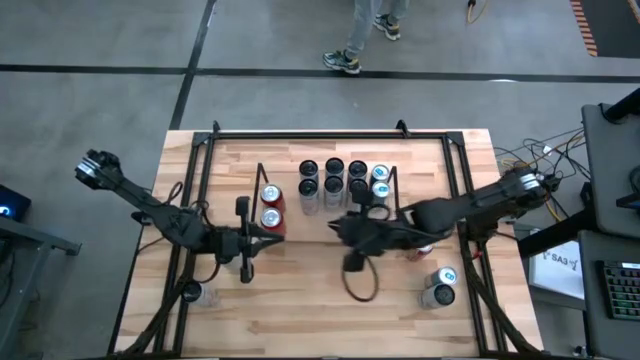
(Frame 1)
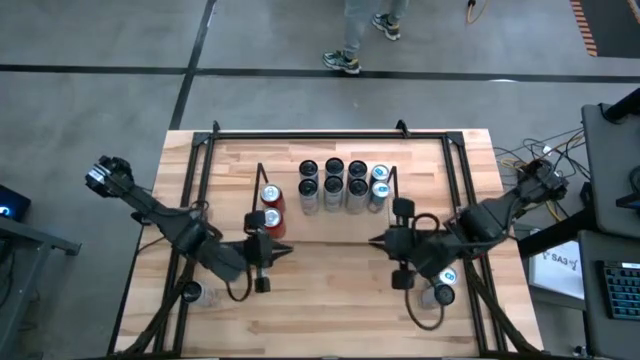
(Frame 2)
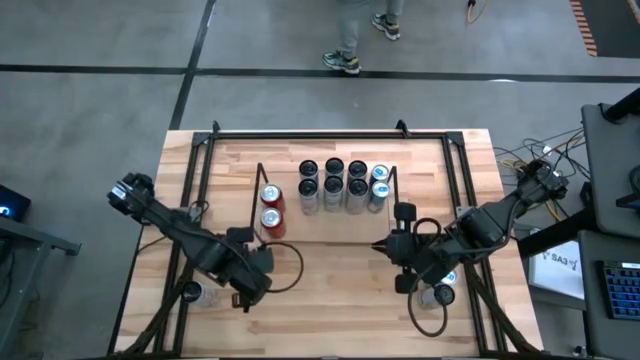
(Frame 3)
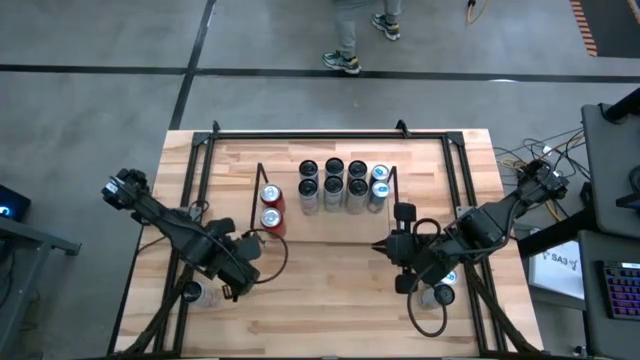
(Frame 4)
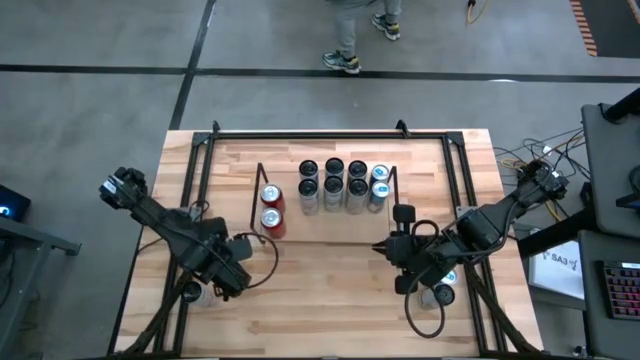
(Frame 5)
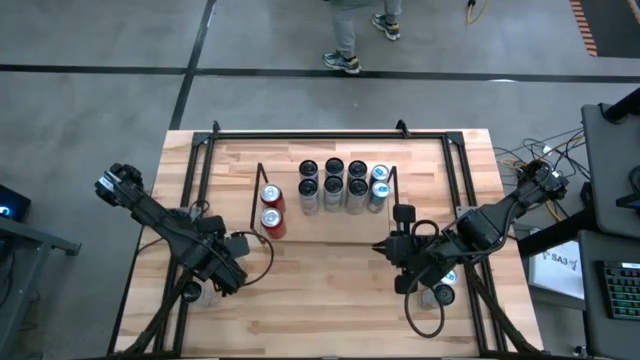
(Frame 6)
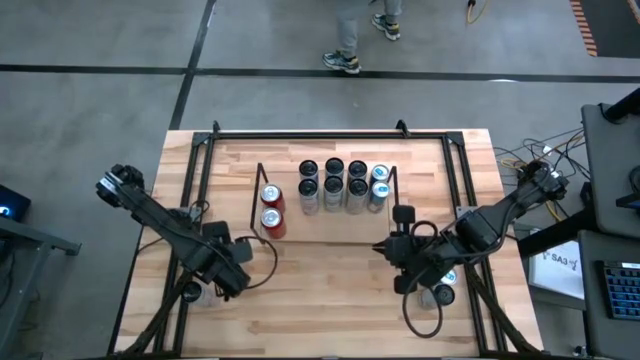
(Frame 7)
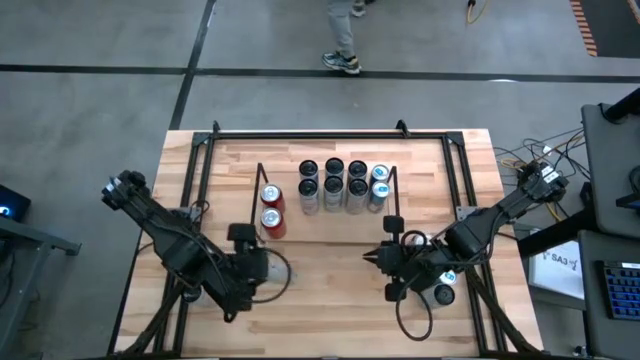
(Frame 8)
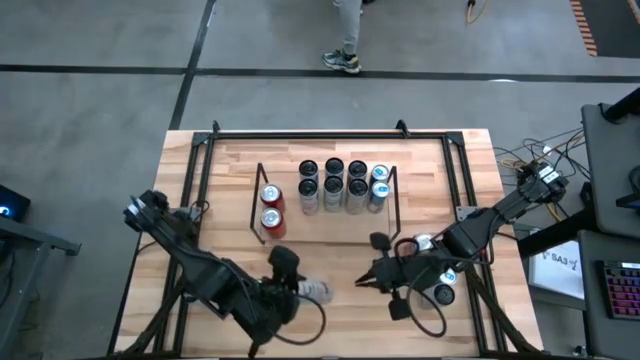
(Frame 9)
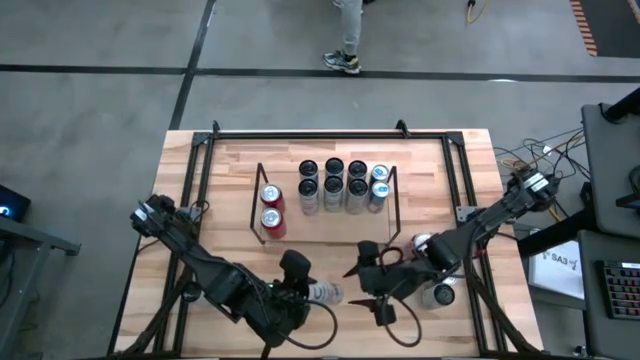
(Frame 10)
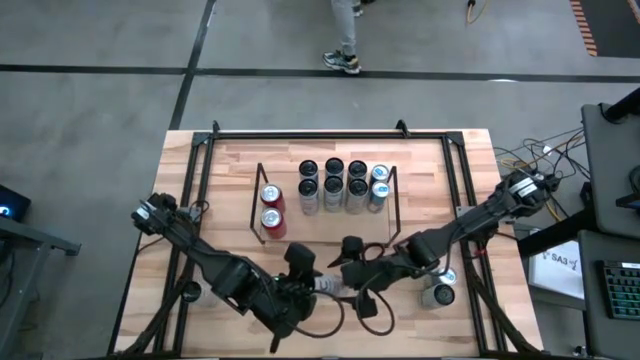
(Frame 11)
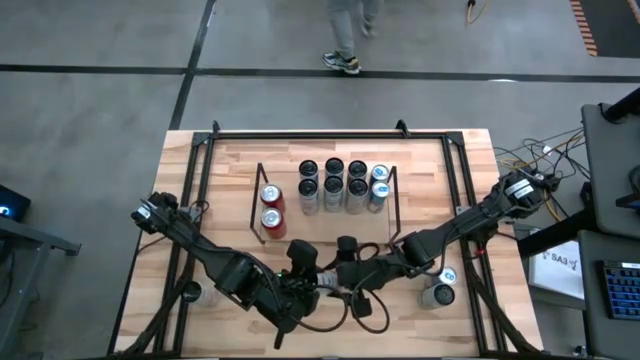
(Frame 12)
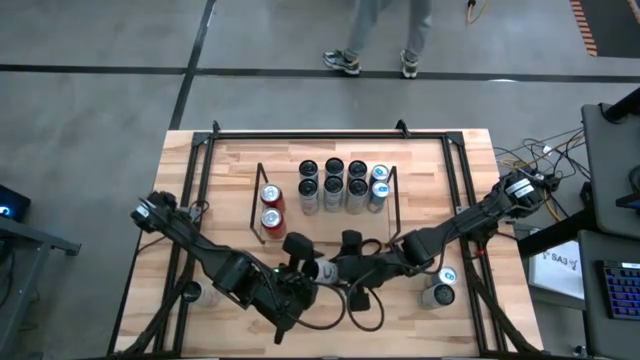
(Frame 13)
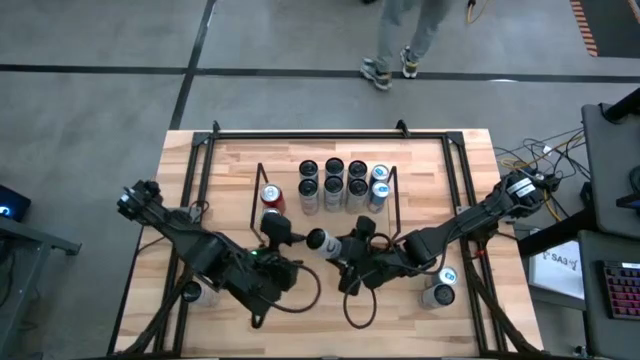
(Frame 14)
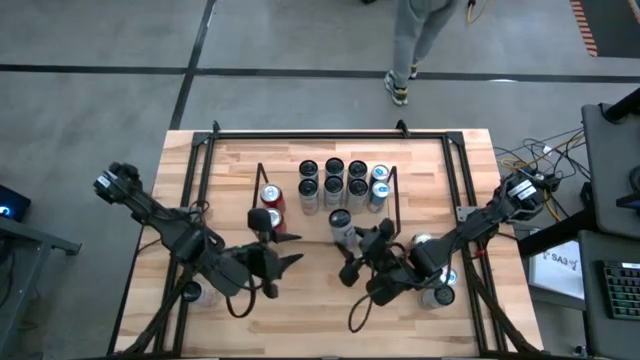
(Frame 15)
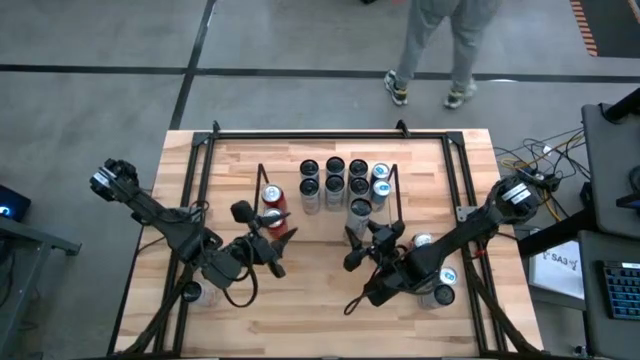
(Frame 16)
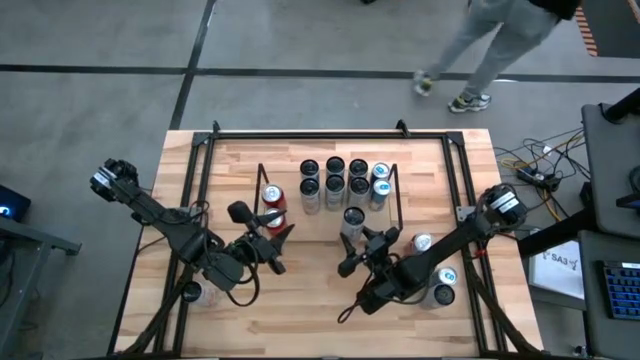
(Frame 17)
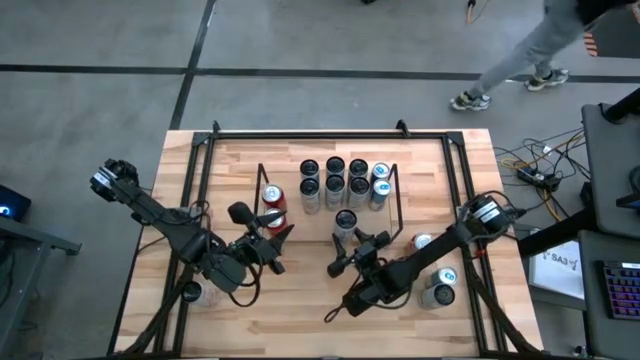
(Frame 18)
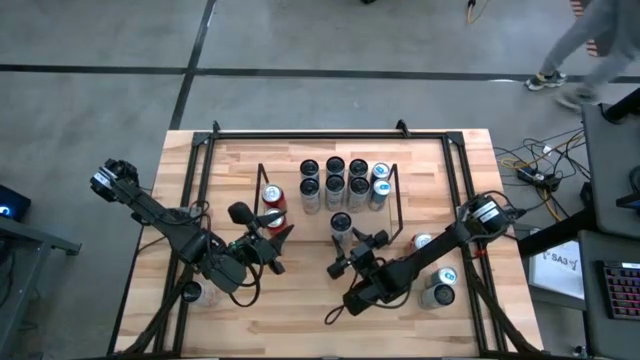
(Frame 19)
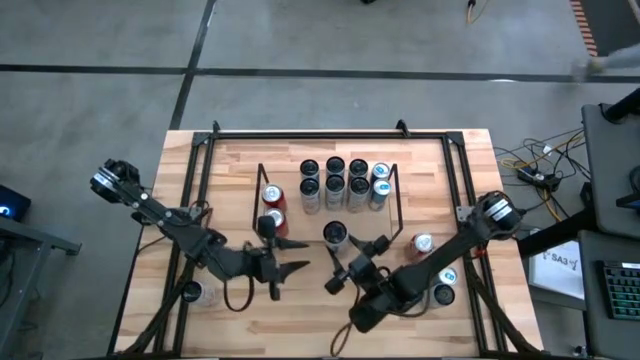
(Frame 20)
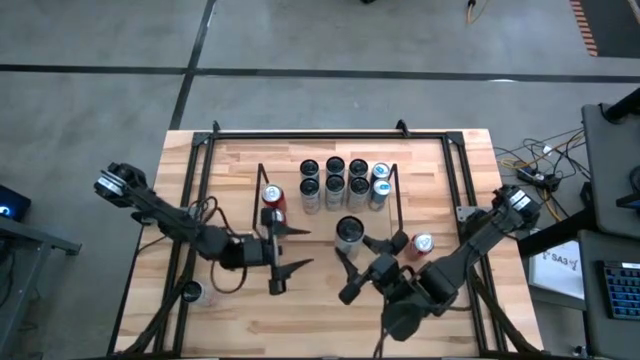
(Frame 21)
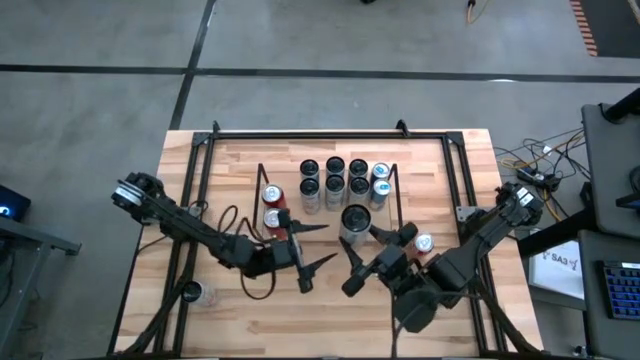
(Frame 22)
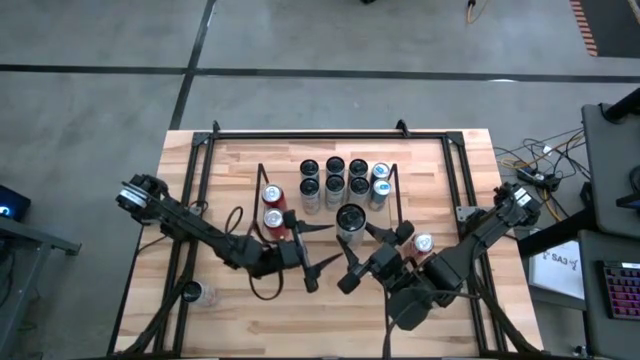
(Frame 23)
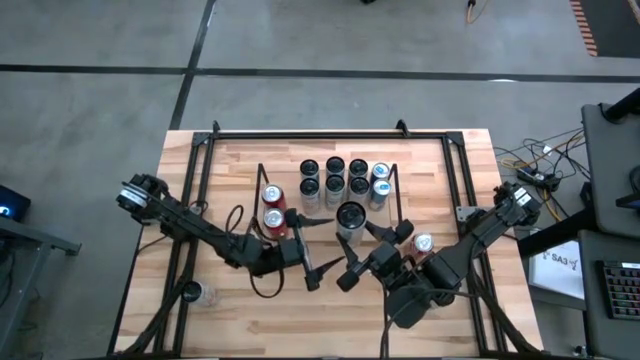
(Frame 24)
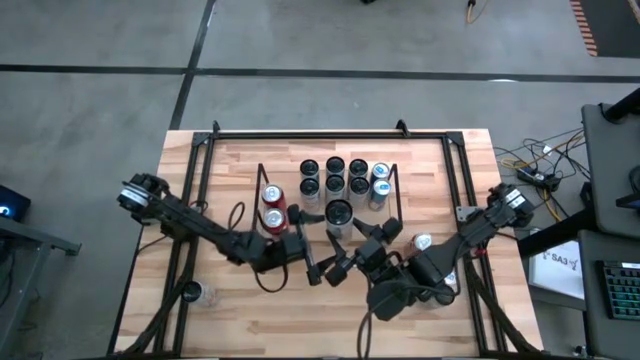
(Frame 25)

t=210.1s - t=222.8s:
Task: Place canned beverage on shelf
Put the white and yellow soda can on the shelf aligned with the other white and yellow soda can

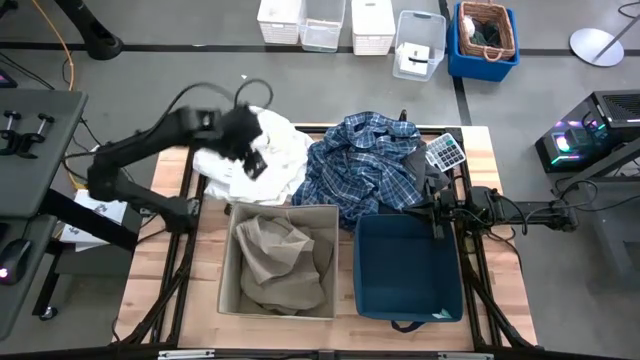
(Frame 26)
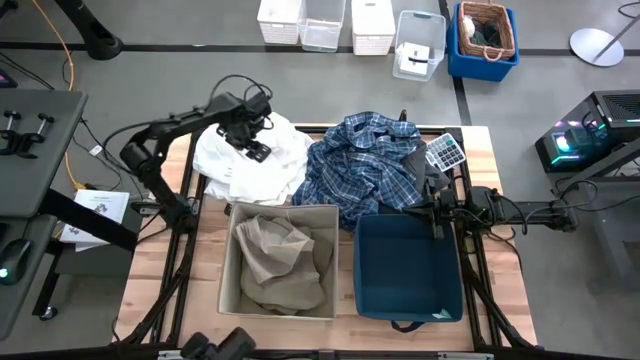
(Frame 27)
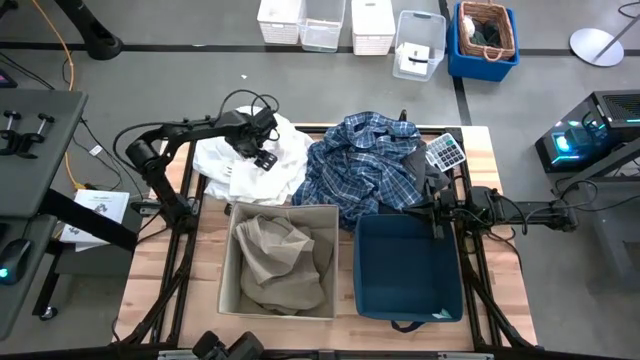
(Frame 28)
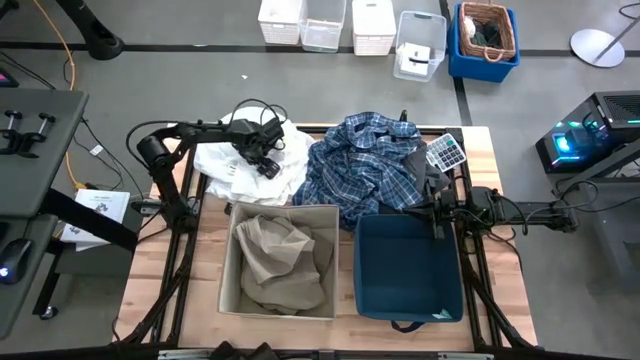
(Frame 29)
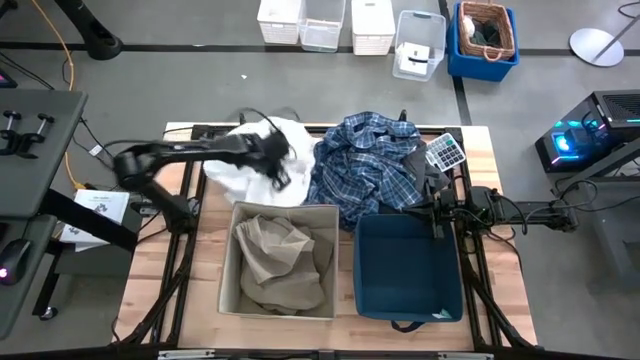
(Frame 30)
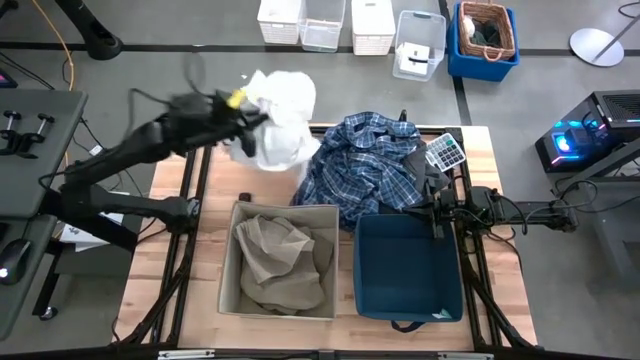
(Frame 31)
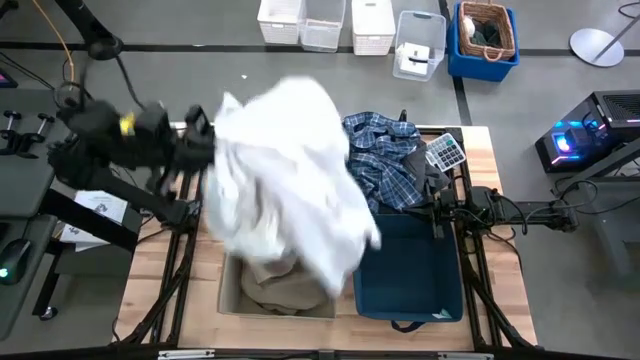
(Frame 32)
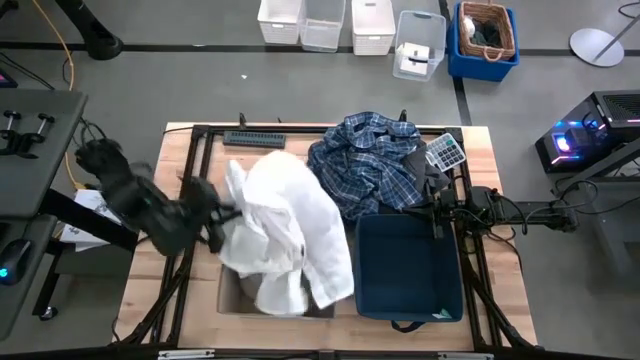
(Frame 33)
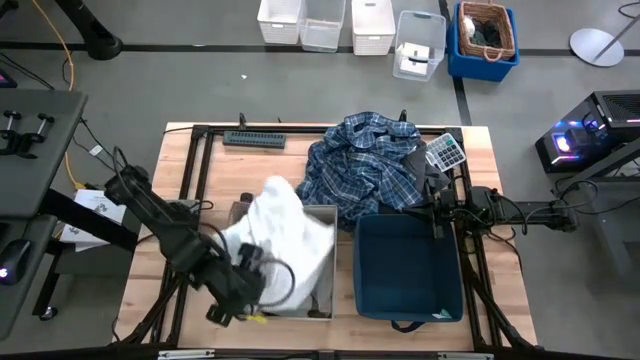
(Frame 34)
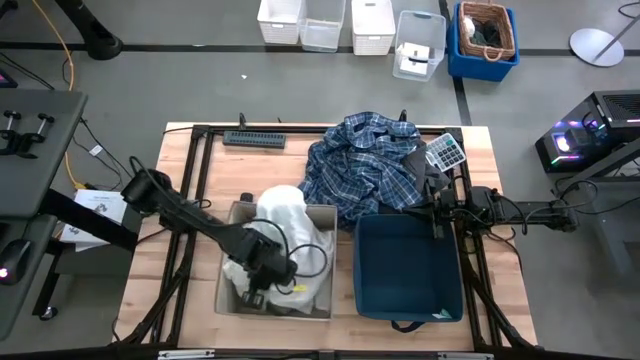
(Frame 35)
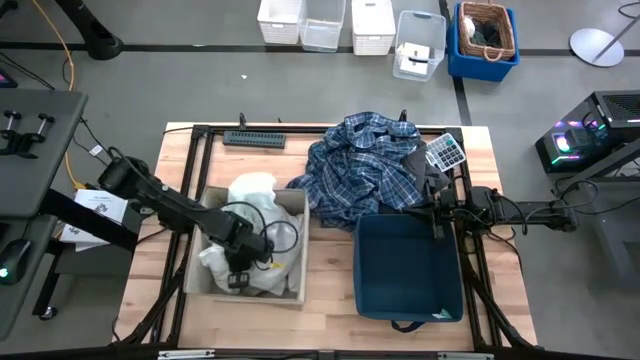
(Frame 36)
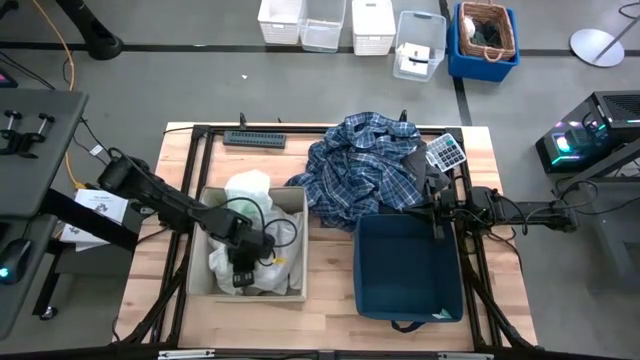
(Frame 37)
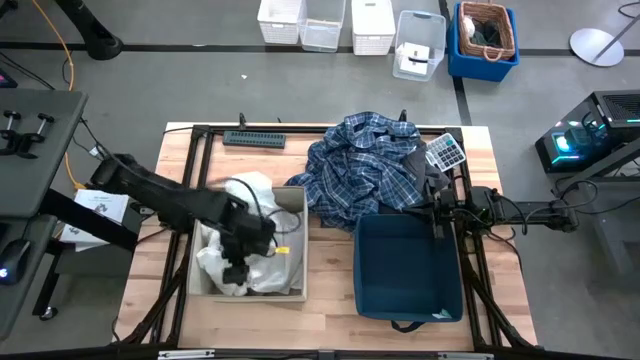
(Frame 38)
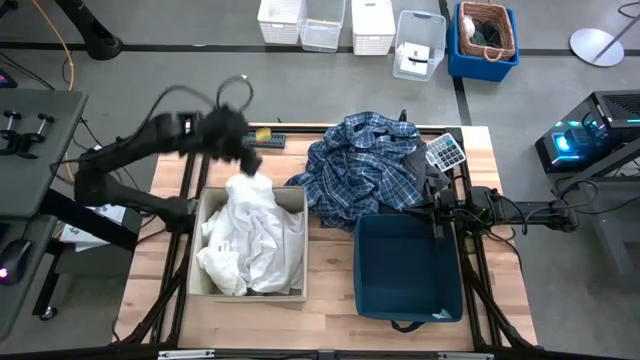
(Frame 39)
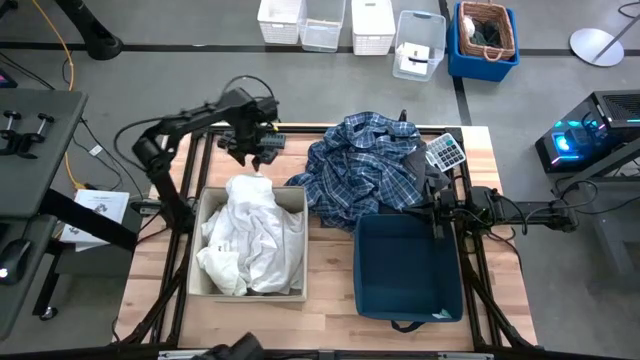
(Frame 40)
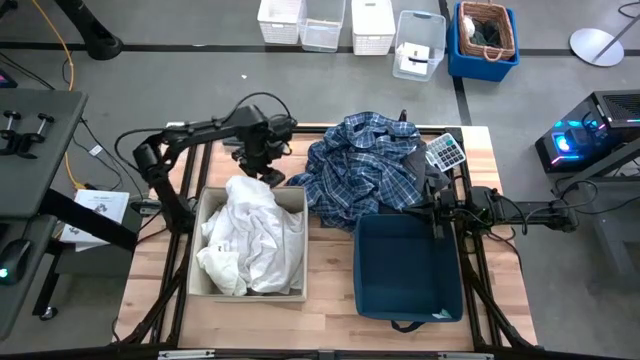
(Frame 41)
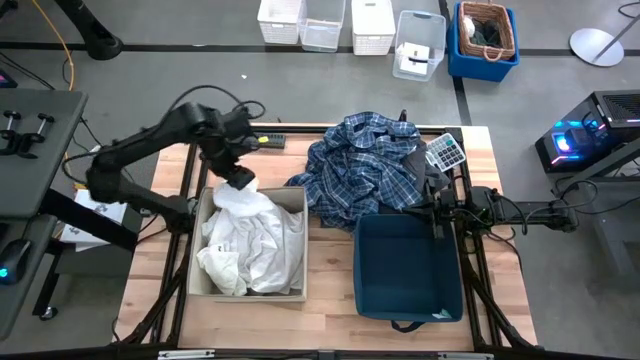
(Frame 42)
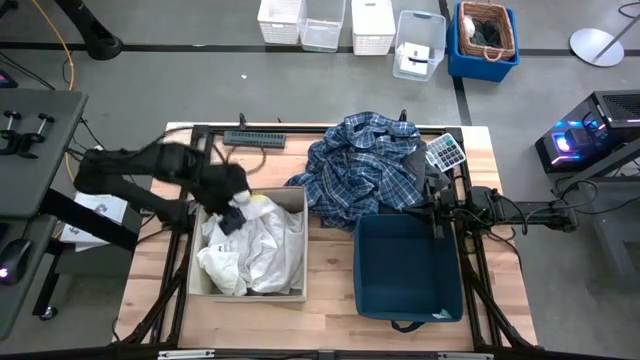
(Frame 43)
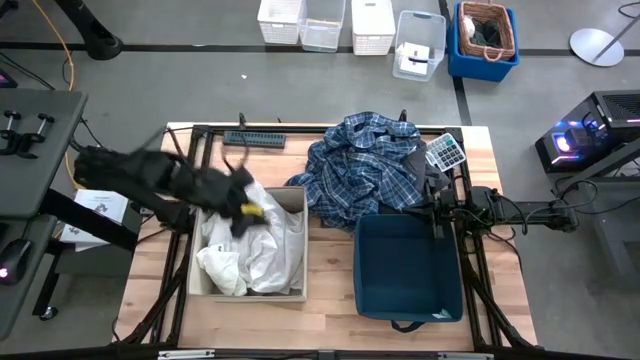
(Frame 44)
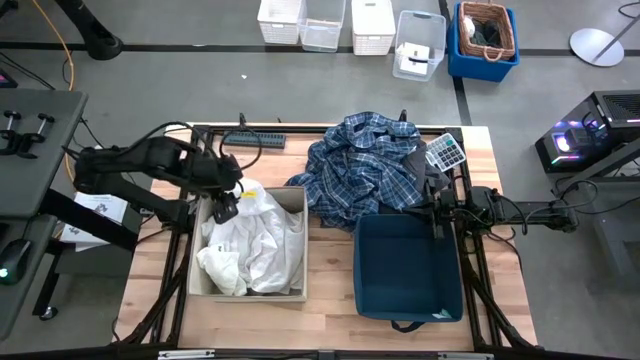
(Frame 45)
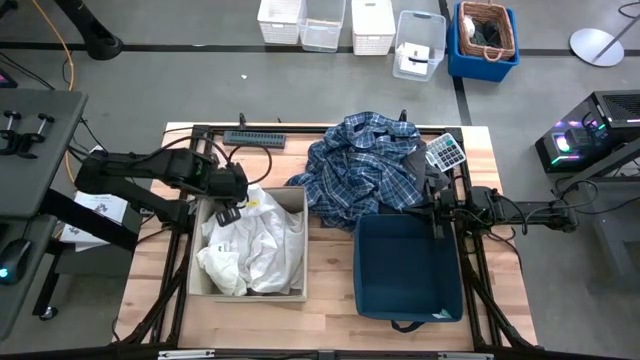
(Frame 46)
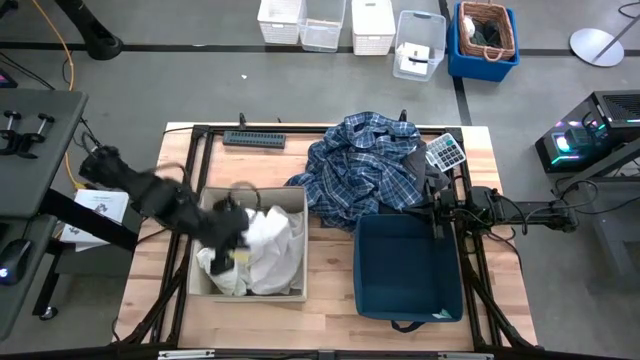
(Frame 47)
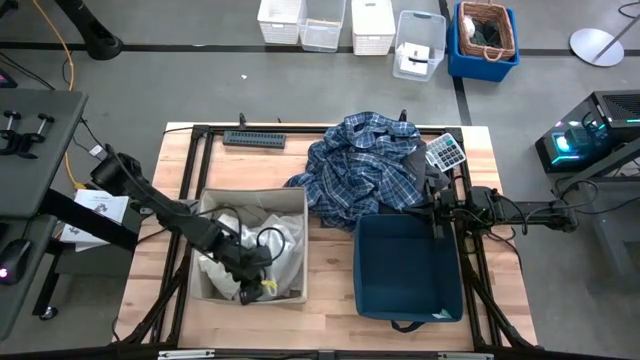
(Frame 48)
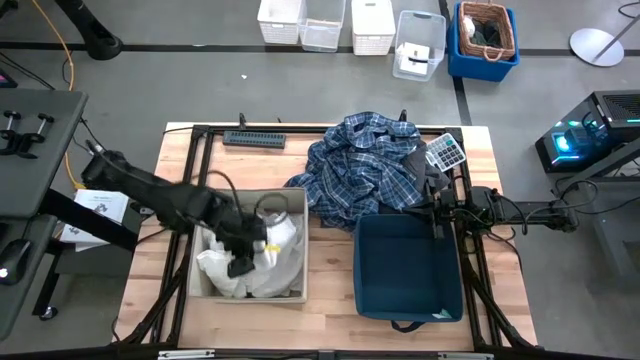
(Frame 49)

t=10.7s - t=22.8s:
Task: Sort clothes
Put the white polo shirt into the white laundry bin
